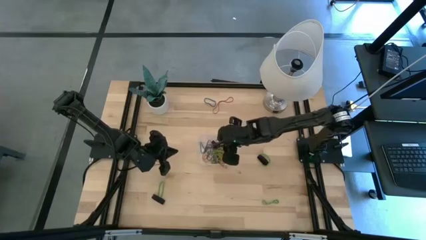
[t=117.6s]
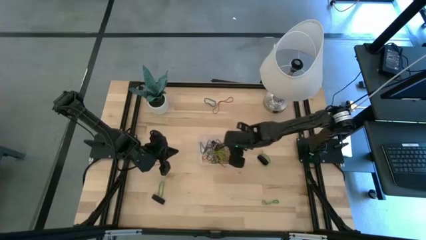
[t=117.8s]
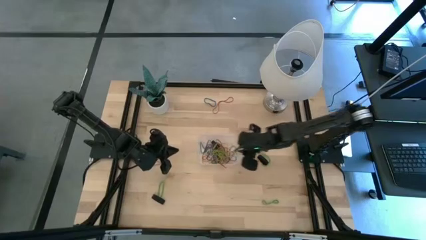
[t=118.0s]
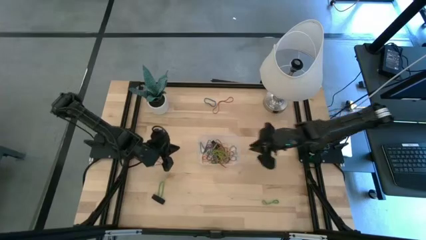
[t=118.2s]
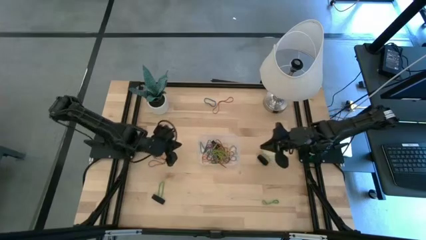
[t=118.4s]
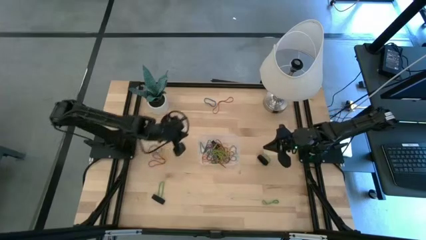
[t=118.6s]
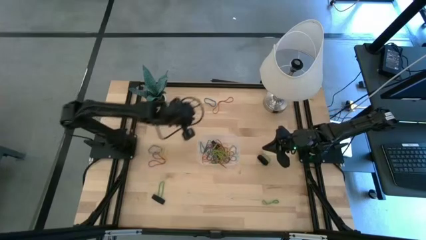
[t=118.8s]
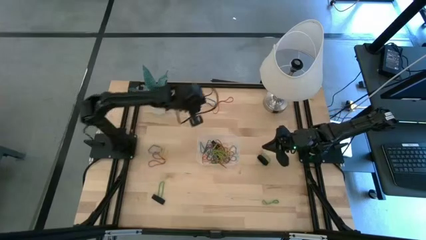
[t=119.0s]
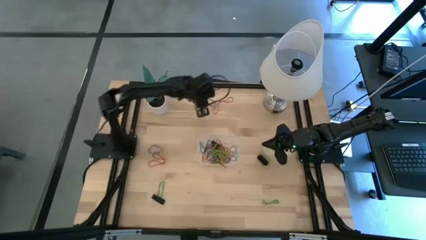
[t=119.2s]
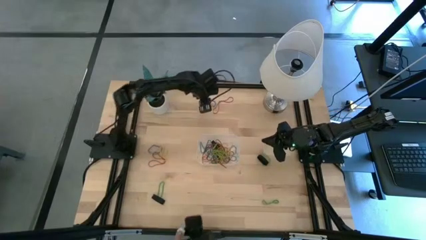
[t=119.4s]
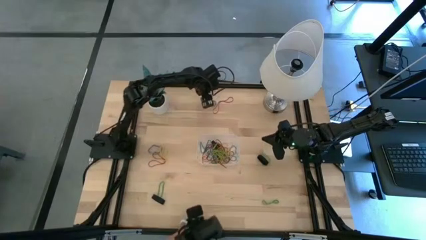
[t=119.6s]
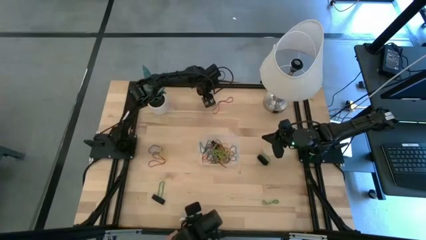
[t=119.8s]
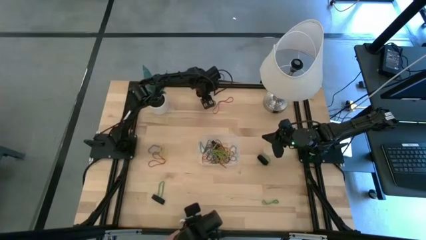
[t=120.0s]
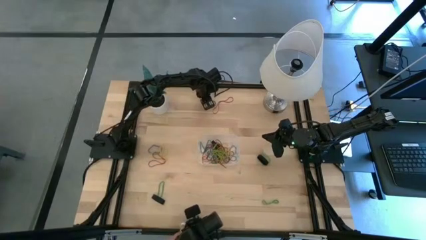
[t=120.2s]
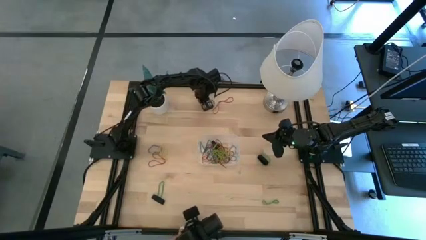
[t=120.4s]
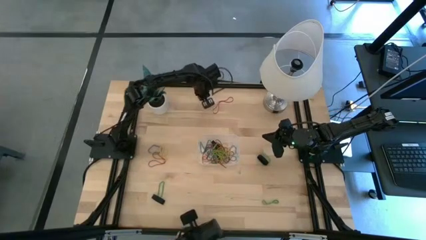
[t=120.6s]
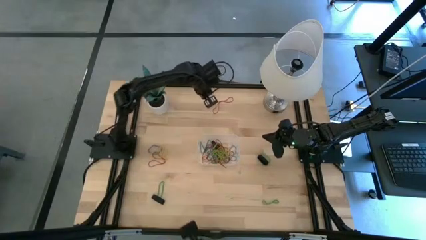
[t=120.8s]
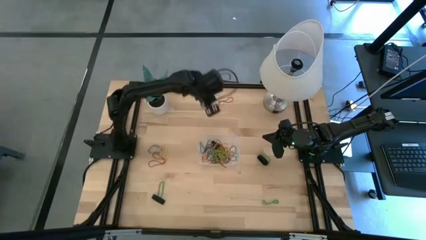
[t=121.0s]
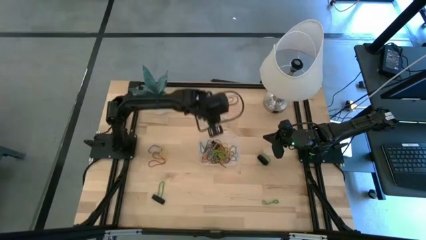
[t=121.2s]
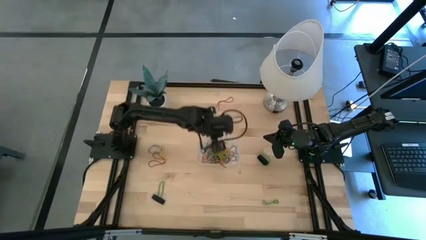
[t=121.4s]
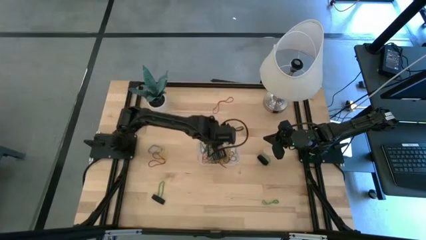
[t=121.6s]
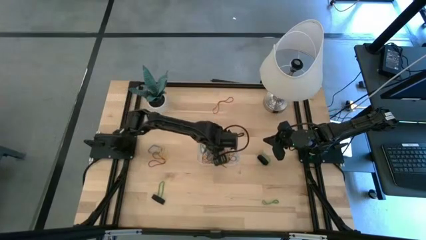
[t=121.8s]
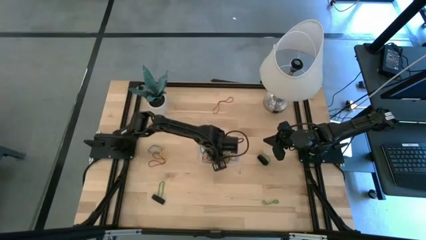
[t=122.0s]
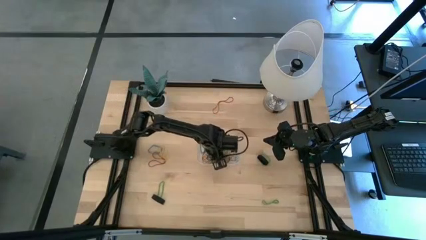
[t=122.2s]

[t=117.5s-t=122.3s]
Task: Pick and place rubber bands into bin
Put the blue rubber band into the transparent bin

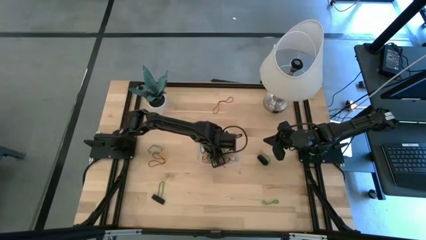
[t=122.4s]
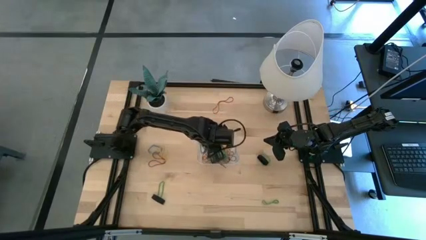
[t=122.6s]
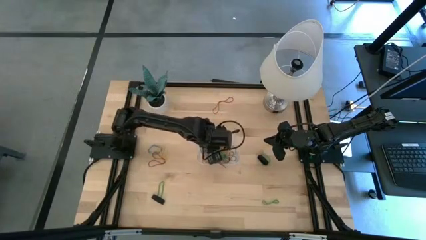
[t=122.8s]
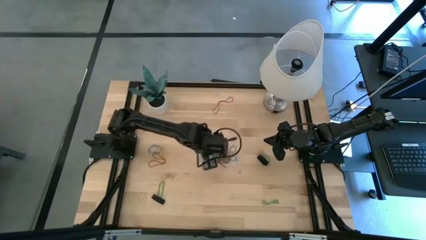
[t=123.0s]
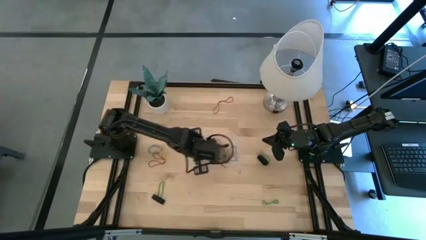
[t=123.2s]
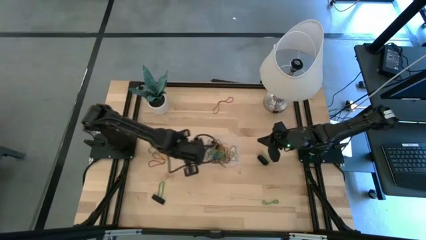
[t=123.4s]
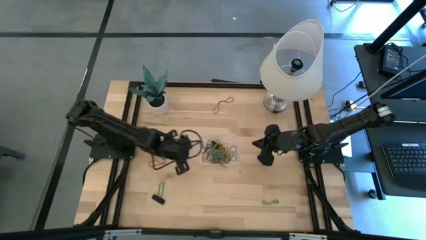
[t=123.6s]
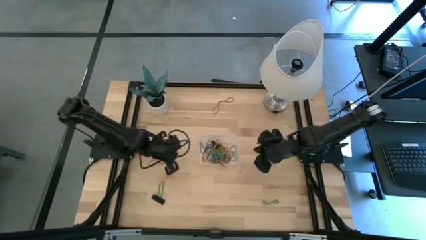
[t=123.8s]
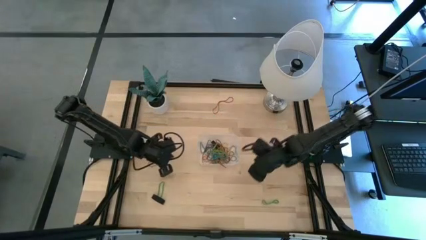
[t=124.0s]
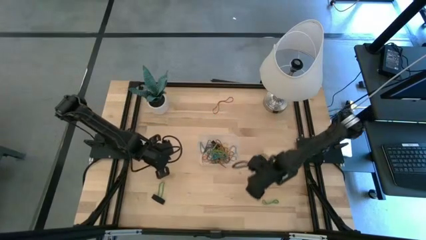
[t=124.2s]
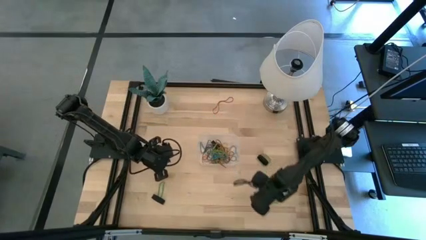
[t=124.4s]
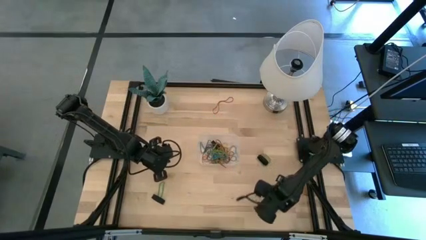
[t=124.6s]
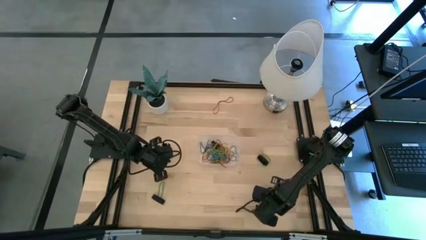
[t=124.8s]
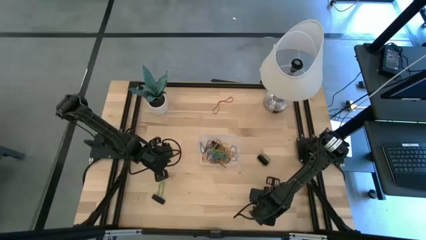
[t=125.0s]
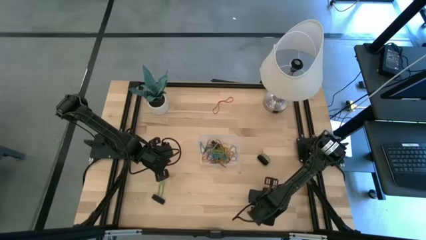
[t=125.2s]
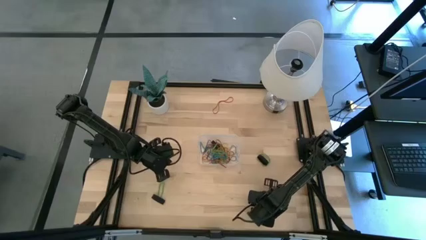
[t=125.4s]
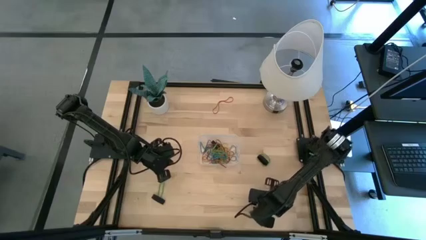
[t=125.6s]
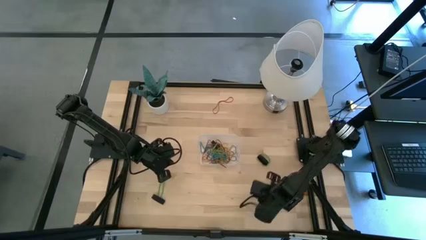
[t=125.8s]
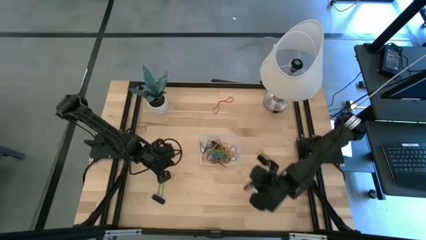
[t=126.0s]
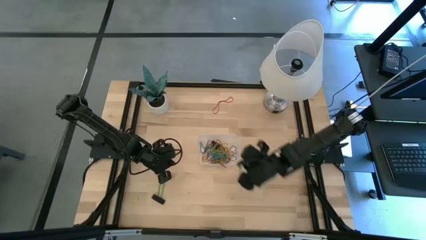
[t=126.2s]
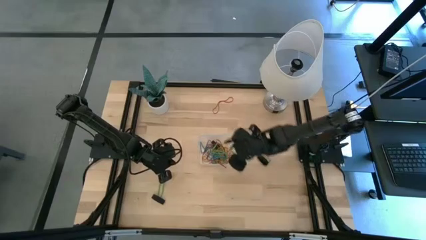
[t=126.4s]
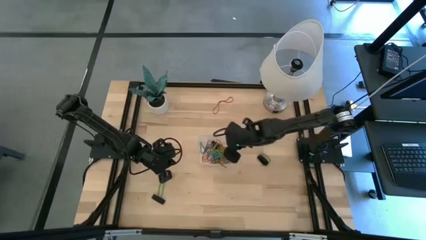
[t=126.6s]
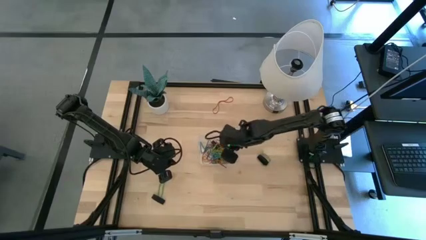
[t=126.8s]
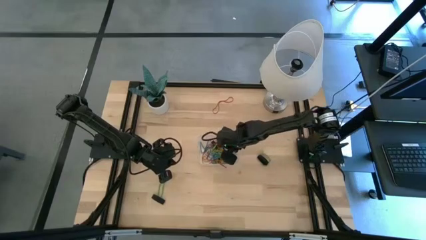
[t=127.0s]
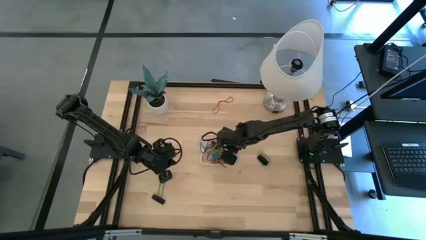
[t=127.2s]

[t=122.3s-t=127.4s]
Put the bottom right green rubber band into the transparent bin

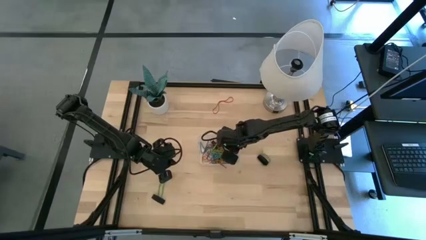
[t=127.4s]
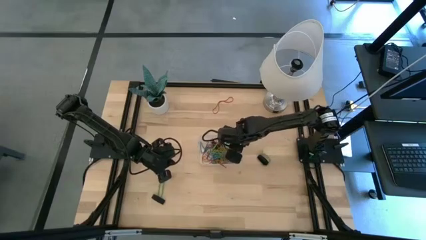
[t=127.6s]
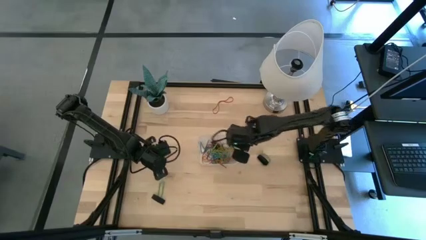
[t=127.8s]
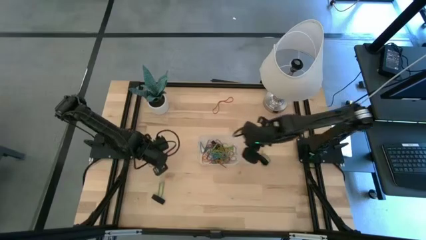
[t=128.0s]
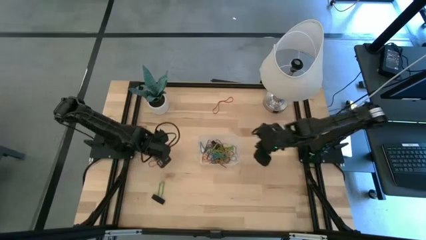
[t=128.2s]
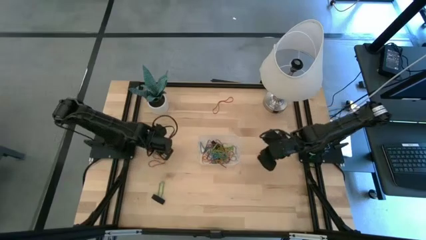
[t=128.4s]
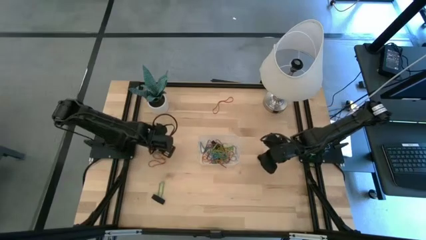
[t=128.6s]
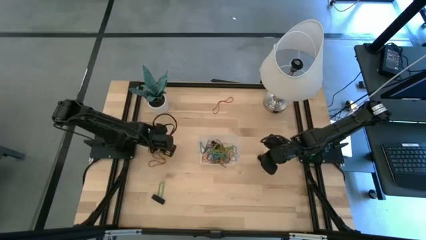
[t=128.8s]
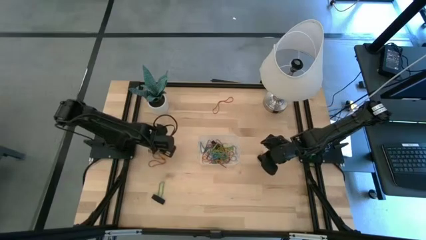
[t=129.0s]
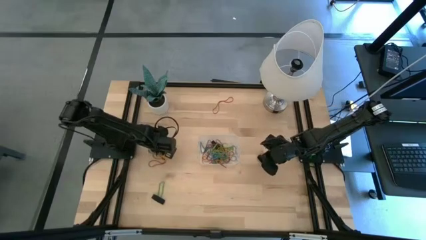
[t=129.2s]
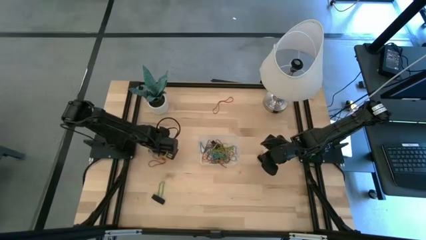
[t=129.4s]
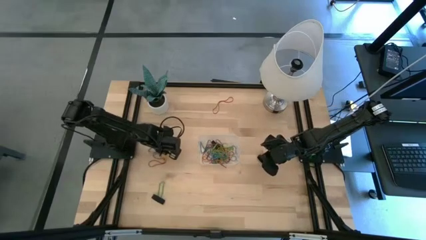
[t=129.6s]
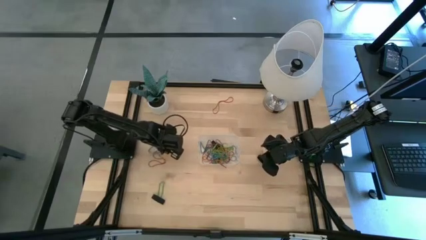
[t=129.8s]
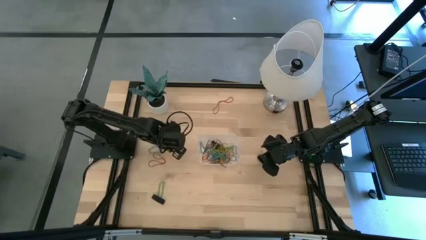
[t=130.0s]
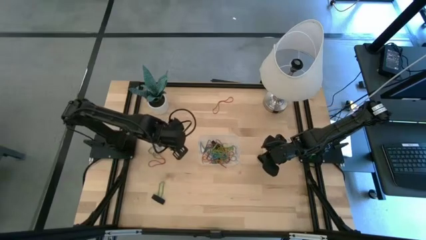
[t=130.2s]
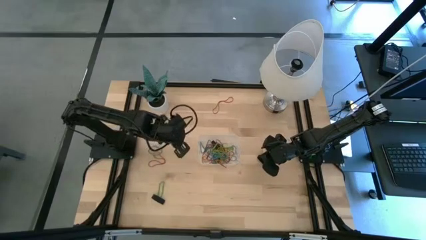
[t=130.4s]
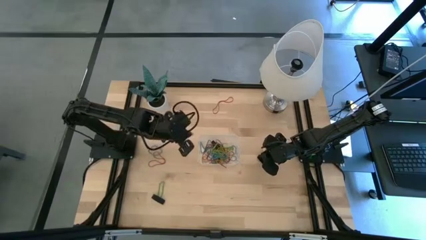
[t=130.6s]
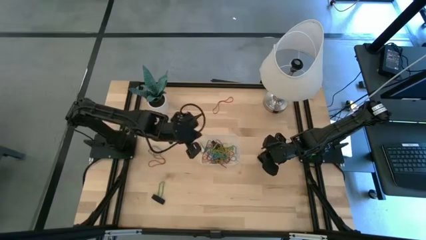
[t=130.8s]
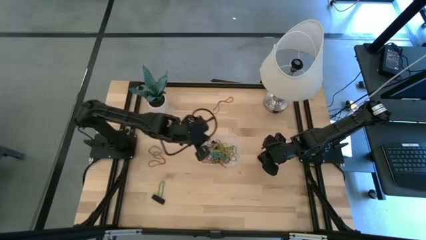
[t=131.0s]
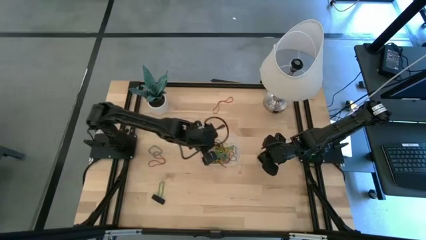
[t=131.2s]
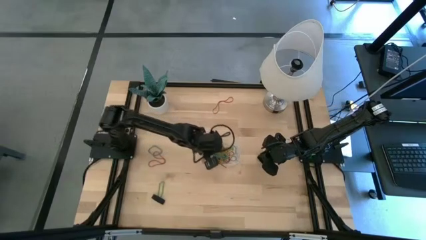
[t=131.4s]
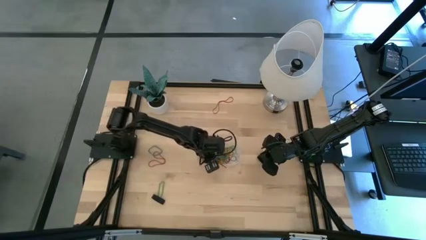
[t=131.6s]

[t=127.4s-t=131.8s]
Put the yellow rubber band into the transparent bin

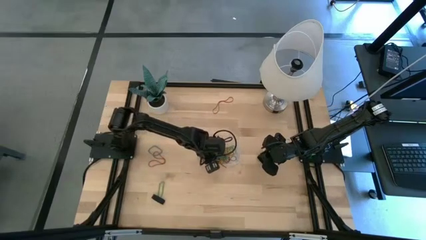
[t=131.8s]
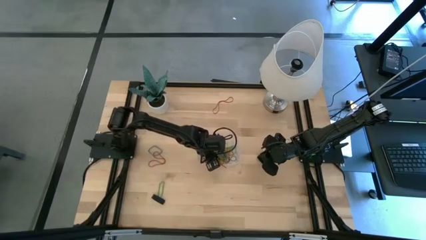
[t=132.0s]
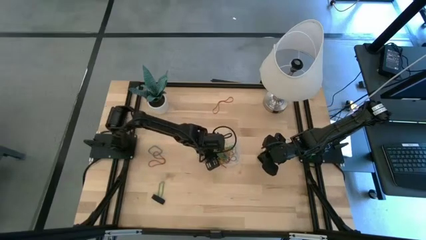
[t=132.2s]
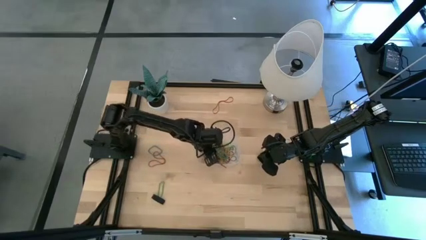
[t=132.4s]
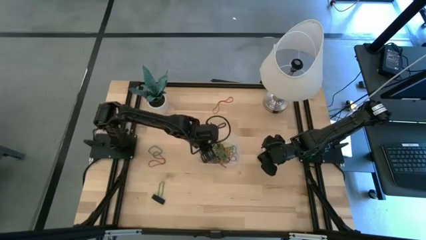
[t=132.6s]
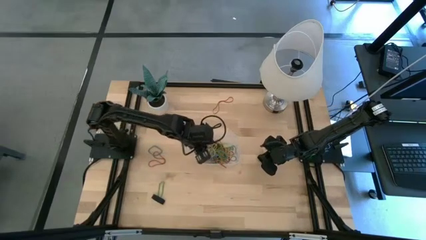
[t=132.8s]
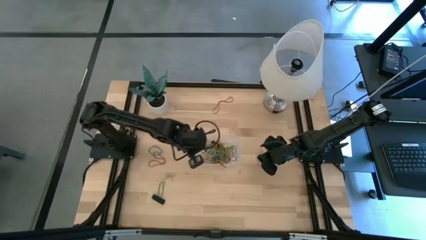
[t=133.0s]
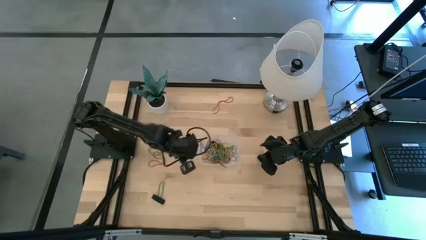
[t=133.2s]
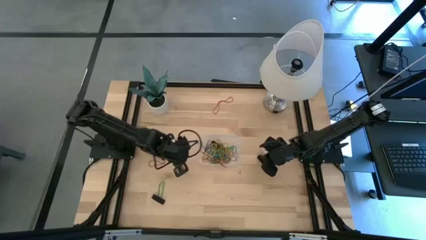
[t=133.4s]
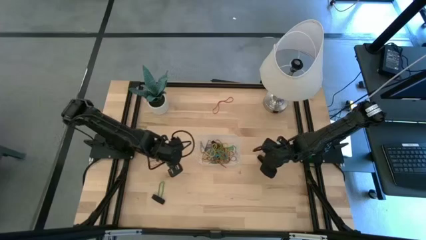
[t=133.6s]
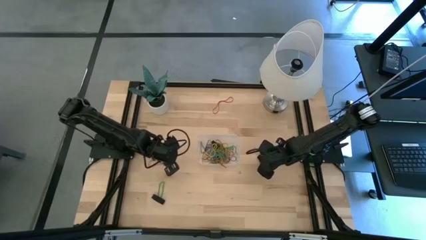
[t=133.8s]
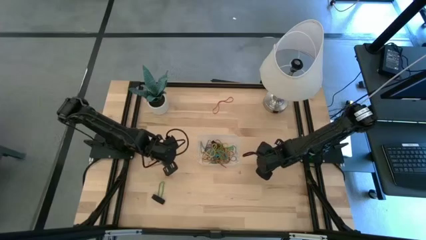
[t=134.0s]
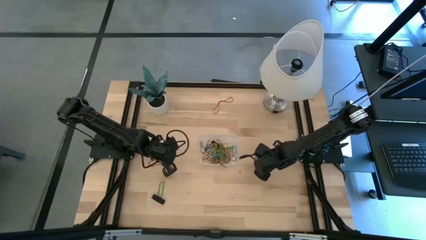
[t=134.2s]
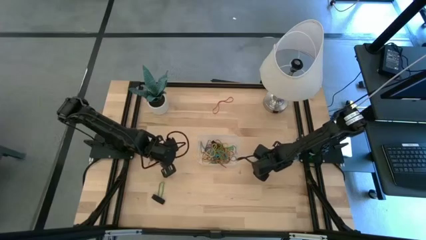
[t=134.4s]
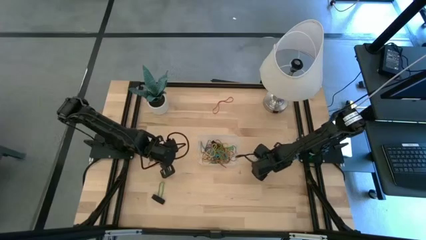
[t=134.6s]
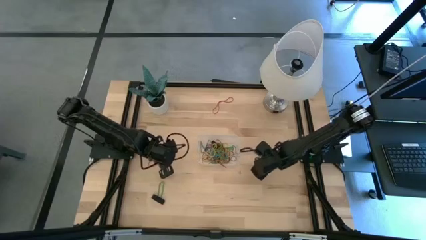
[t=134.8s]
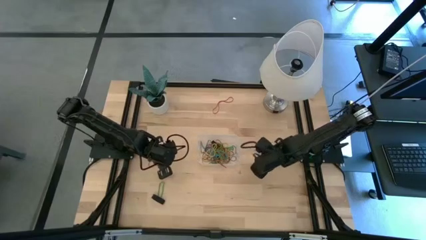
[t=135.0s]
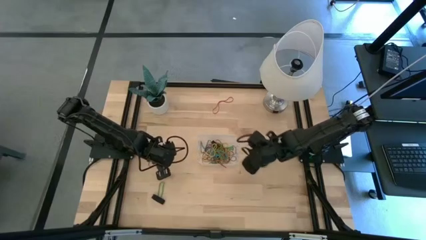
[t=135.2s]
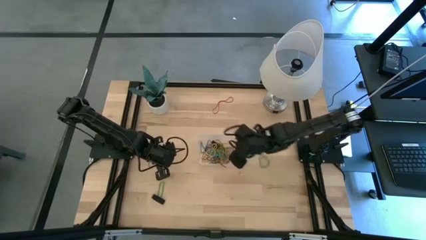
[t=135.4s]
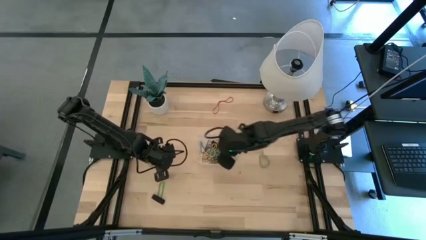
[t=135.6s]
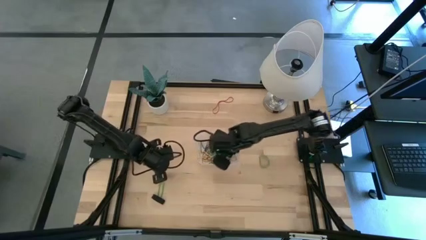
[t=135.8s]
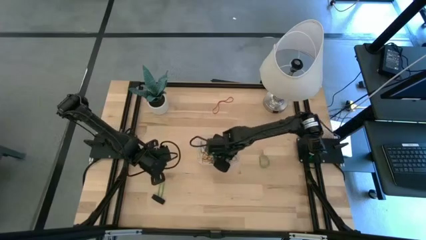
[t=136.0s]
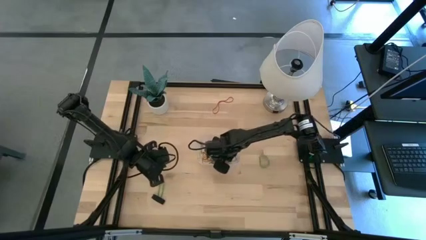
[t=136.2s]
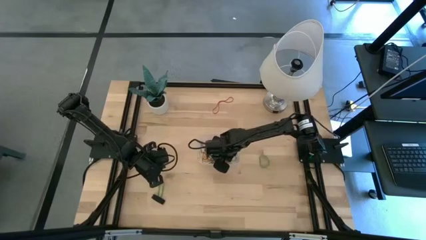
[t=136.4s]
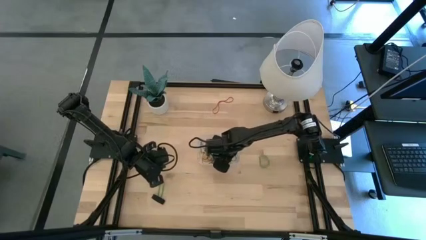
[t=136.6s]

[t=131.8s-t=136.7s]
Put the black rubber band into the transparent bin
